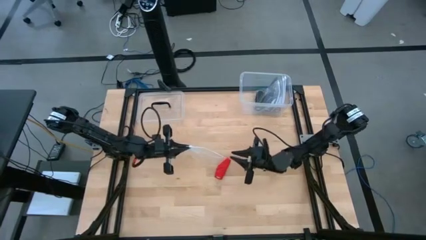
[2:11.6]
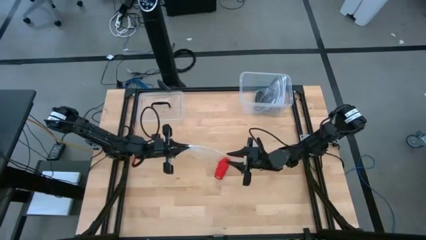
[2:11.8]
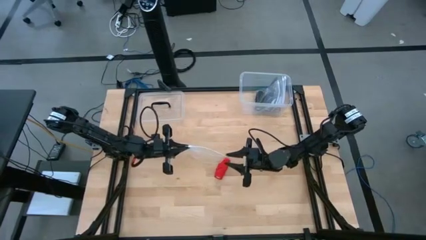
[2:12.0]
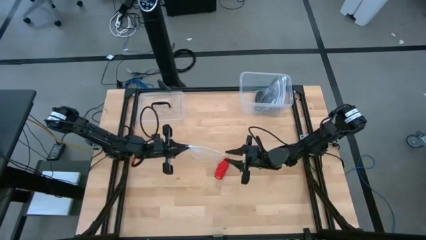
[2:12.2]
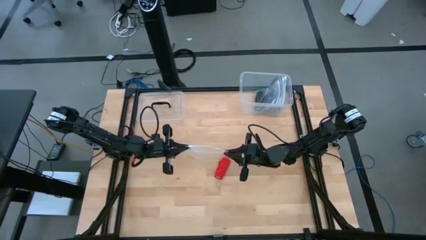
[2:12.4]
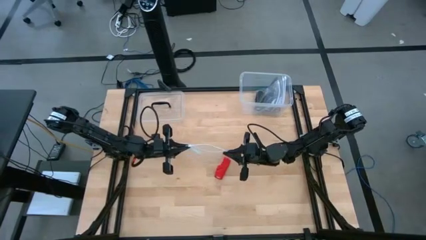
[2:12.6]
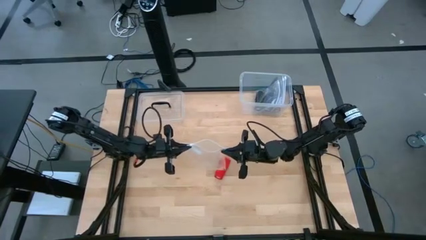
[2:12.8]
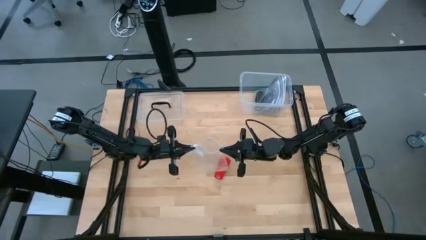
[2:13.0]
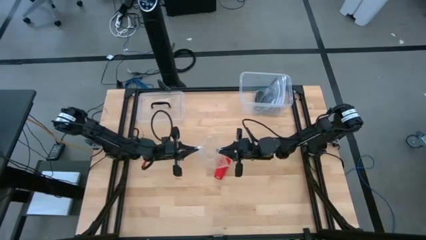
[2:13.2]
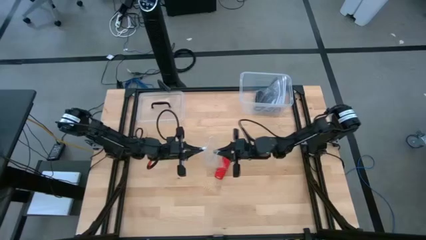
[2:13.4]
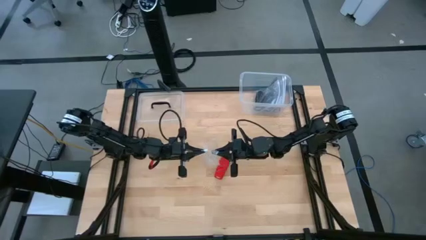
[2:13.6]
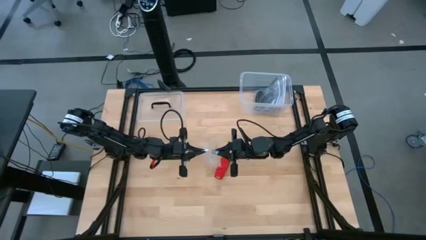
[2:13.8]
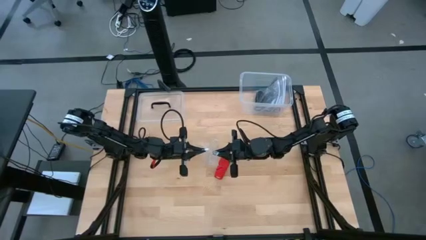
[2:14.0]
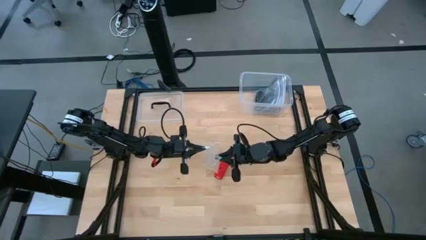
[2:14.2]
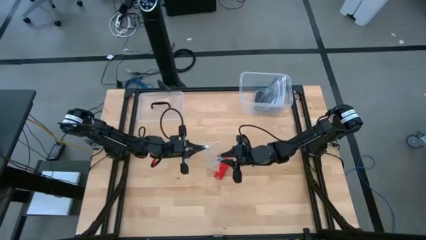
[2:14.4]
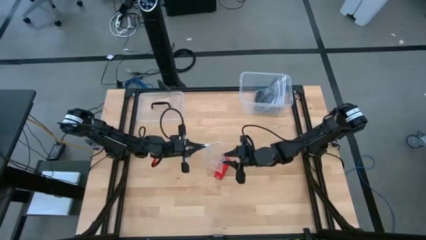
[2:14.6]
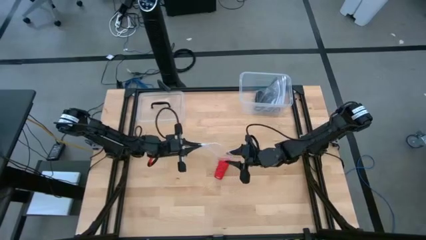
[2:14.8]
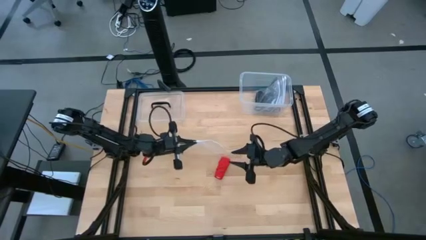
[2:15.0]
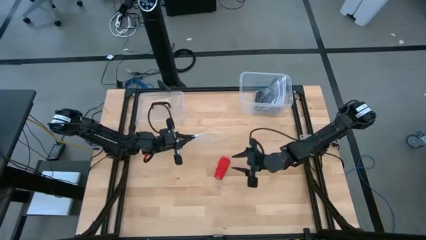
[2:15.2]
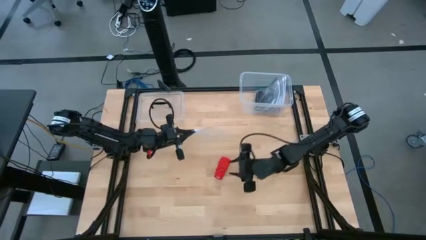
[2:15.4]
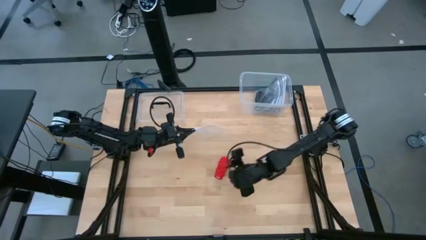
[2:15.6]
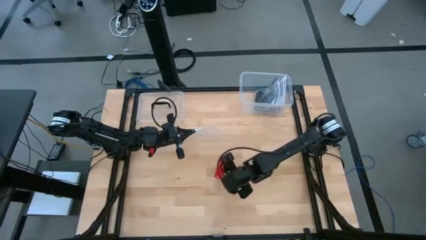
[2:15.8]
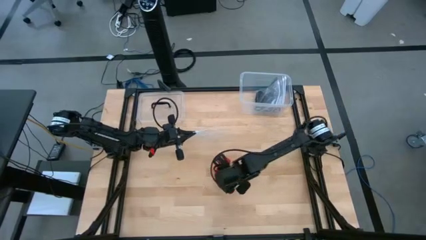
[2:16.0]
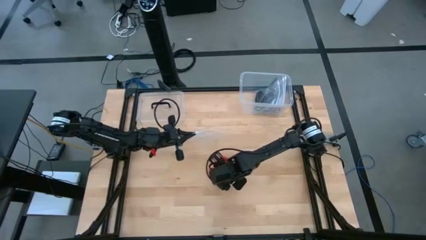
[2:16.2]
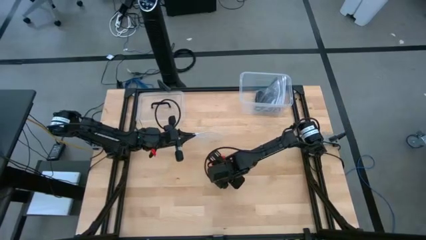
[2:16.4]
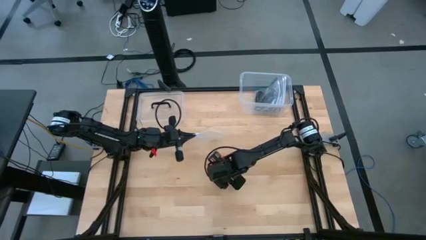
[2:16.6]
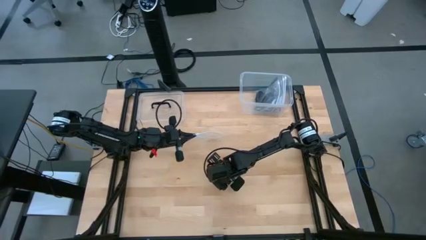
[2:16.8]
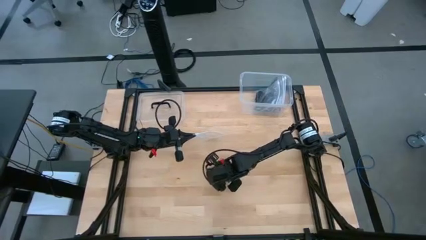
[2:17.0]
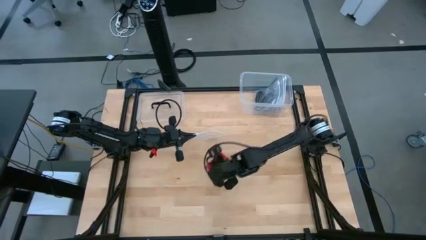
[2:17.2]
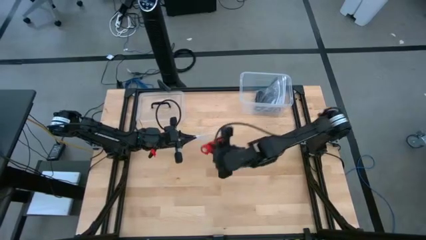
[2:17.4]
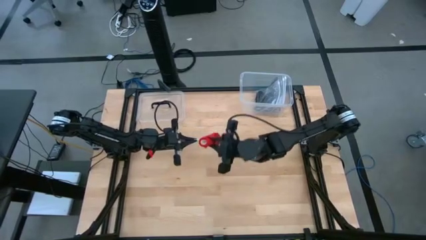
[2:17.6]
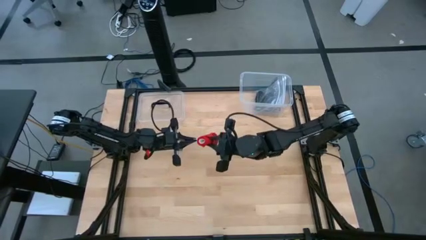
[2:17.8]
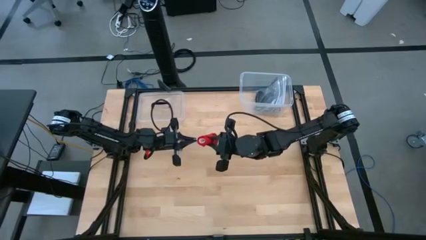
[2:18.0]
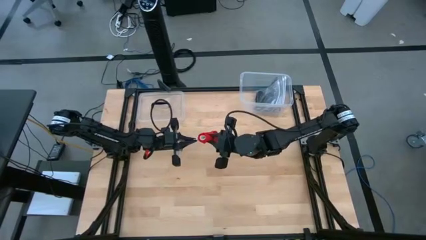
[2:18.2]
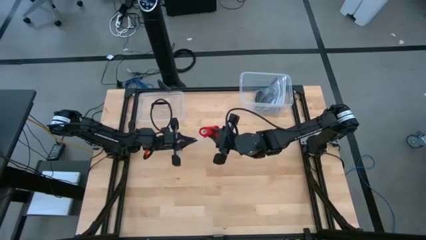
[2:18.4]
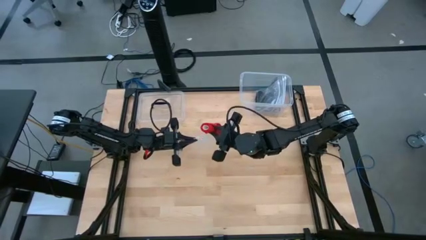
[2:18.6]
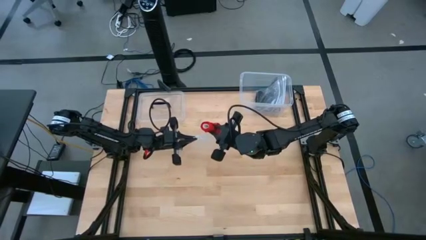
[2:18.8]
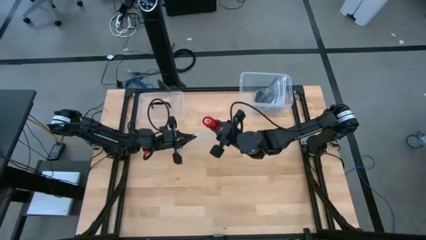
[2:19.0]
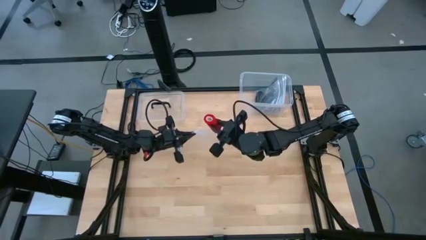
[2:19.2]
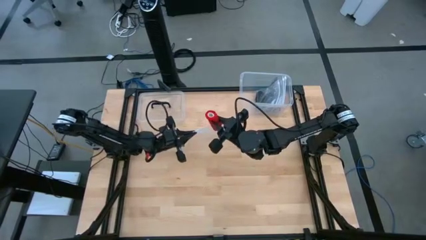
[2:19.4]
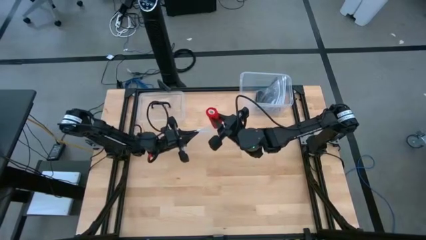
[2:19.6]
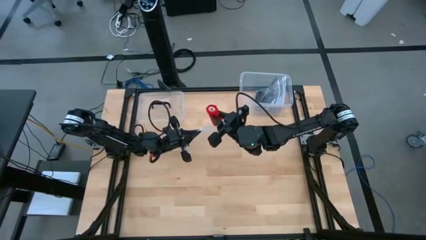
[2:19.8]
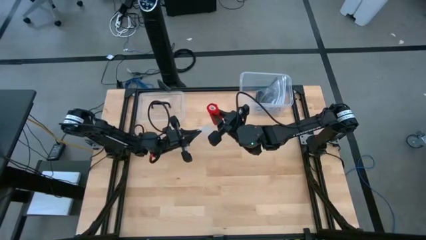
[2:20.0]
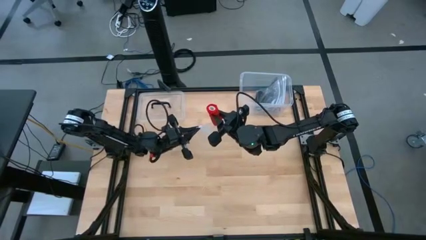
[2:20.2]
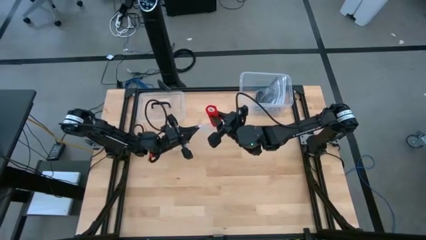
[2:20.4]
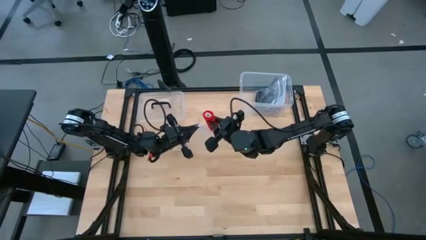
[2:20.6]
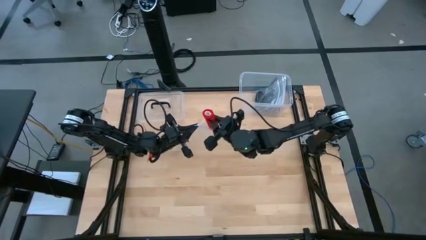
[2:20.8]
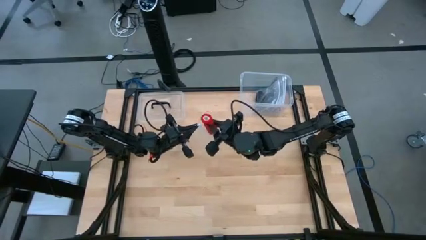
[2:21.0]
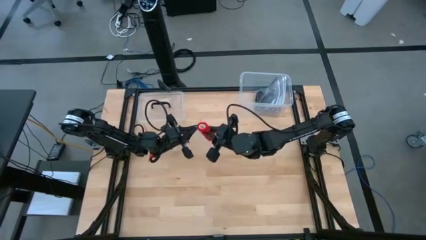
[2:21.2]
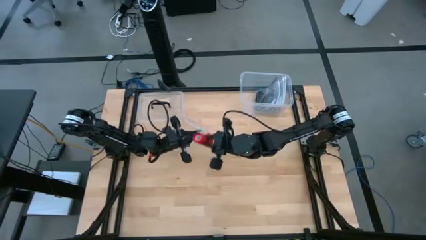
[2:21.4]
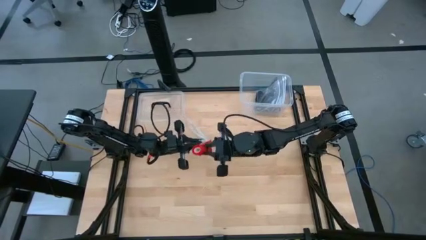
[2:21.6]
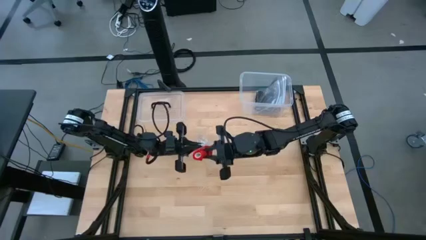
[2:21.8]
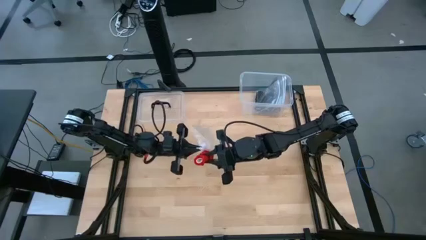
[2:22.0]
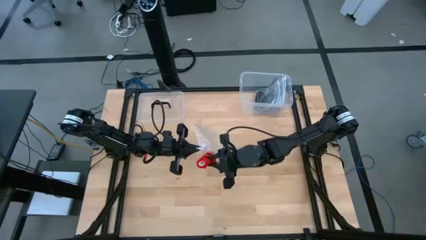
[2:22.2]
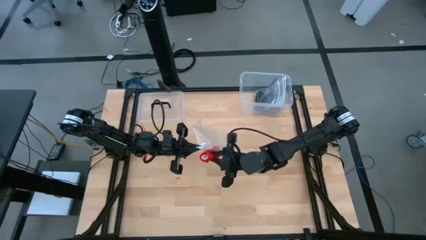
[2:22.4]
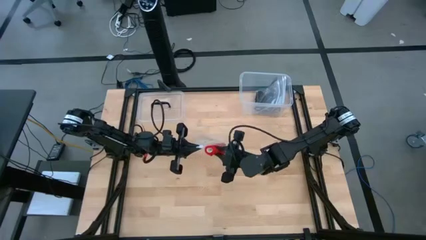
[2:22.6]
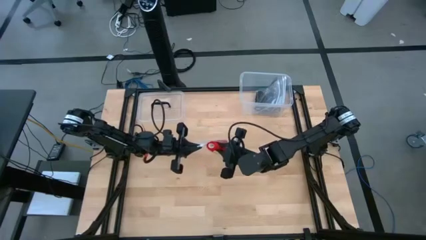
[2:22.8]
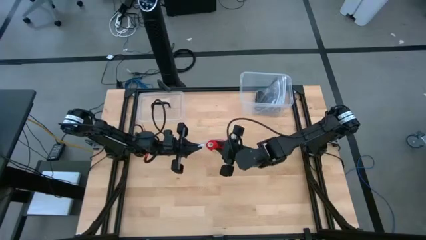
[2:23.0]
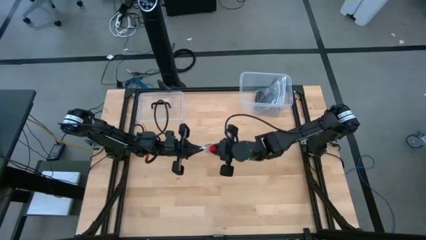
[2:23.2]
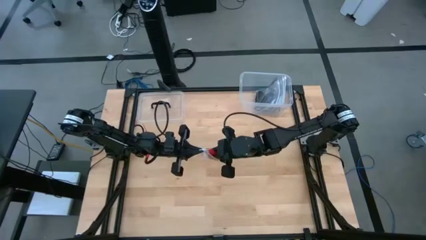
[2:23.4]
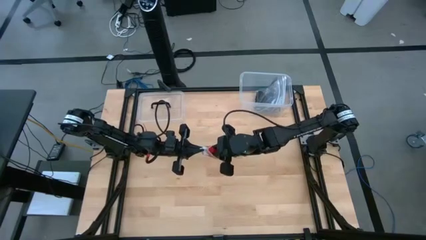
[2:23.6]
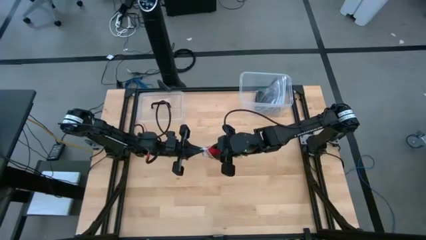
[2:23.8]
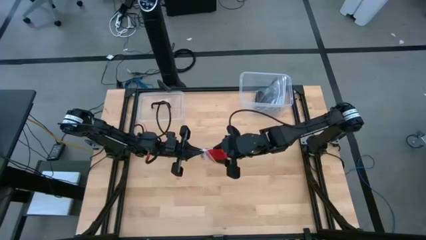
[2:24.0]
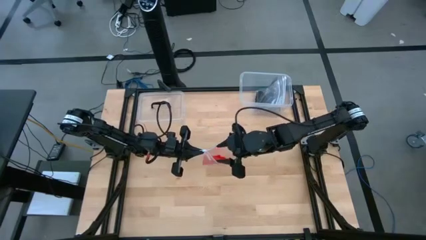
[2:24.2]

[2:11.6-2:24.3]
Task: Roll bandage
Put the red bandage into the transparent zip bag

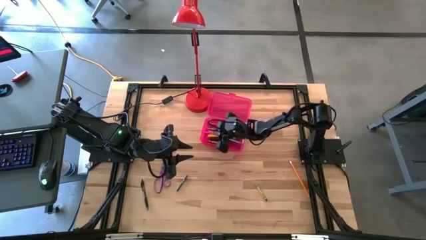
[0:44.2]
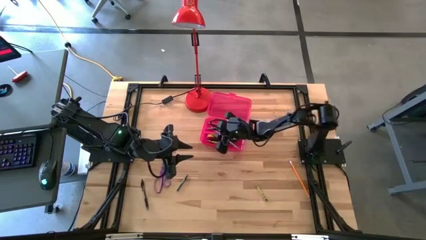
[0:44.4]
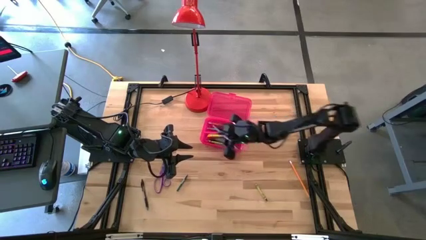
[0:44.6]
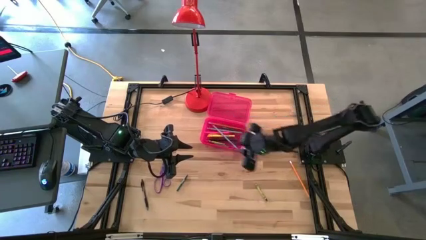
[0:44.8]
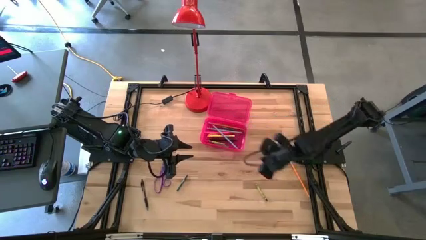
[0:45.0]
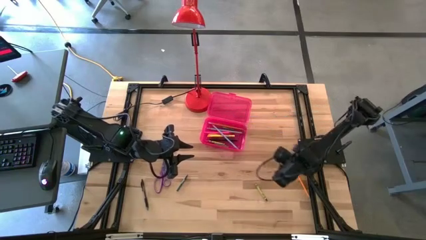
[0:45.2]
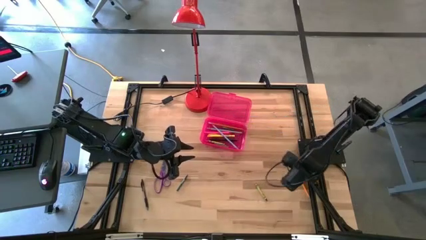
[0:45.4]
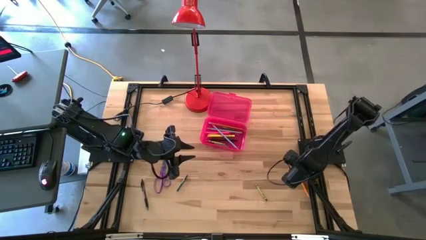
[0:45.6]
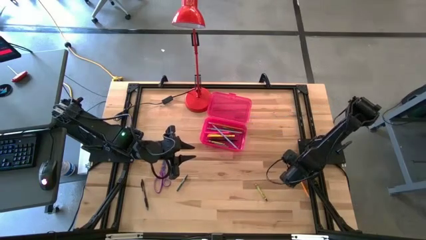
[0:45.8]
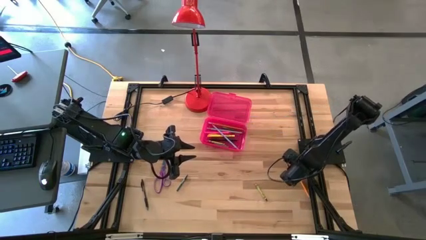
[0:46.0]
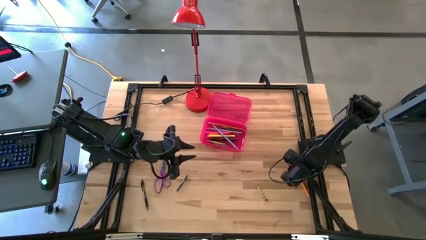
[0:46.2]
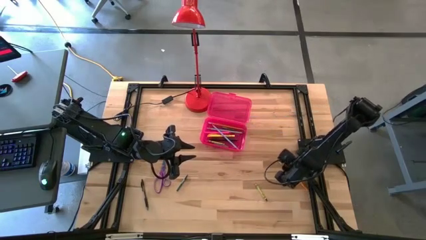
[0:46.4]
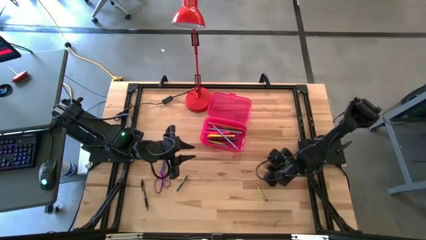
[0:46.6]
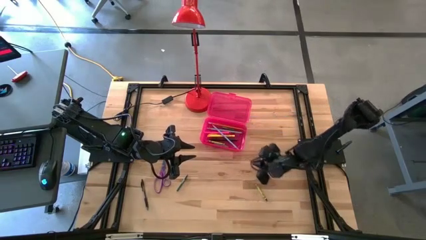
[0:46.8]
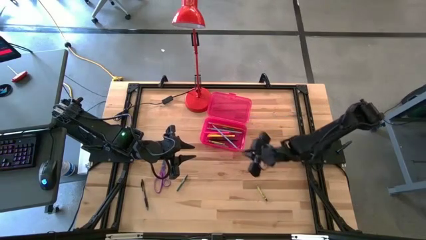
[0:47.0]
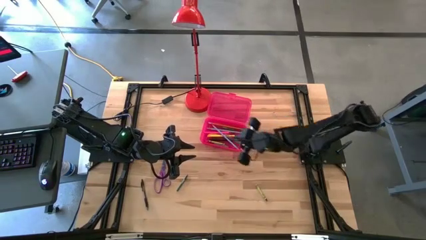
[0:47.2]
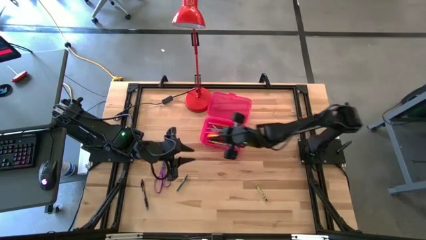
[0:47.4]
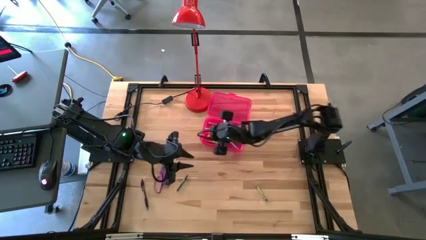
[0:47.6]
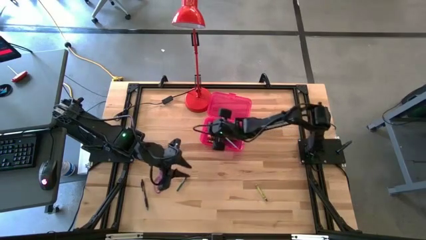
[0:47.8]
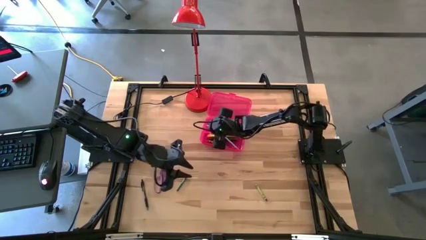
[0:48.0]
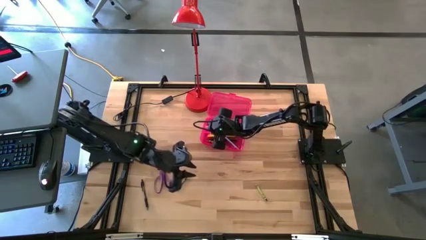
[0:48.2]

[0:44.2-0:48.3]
Task: Pick & place school supplies into a supply box
Put the orange pencil into the pink supply box
